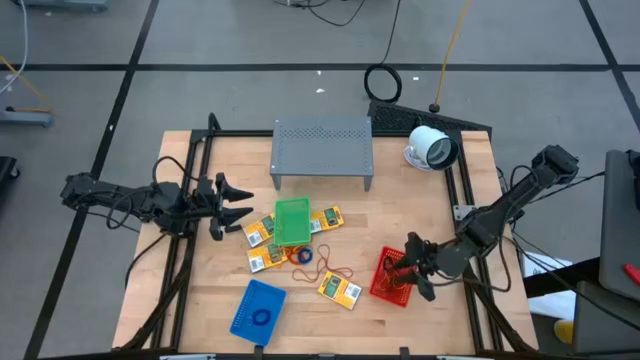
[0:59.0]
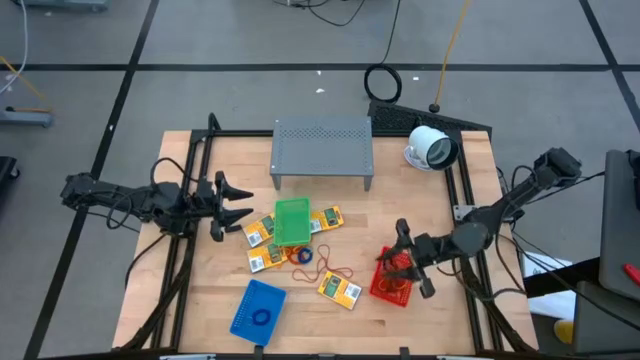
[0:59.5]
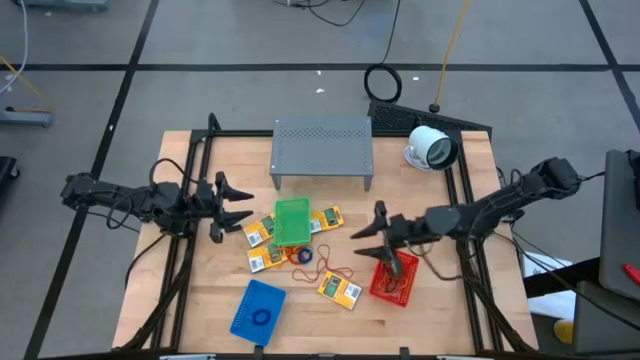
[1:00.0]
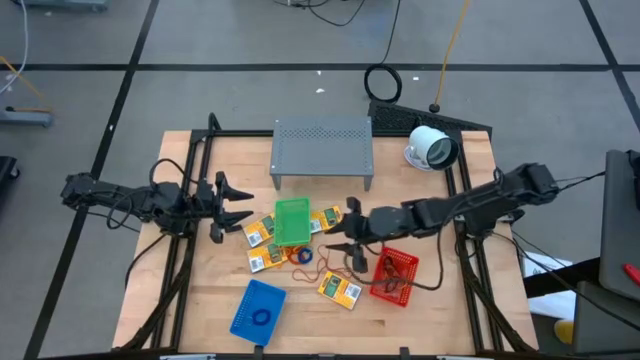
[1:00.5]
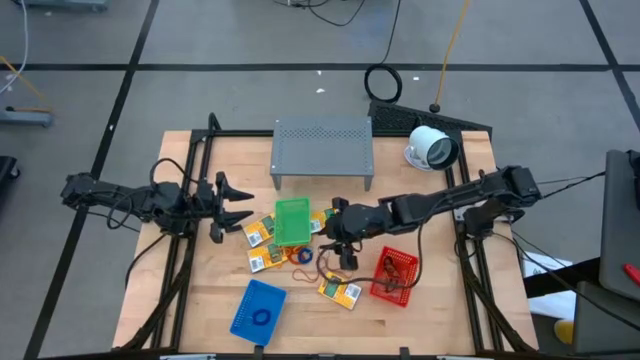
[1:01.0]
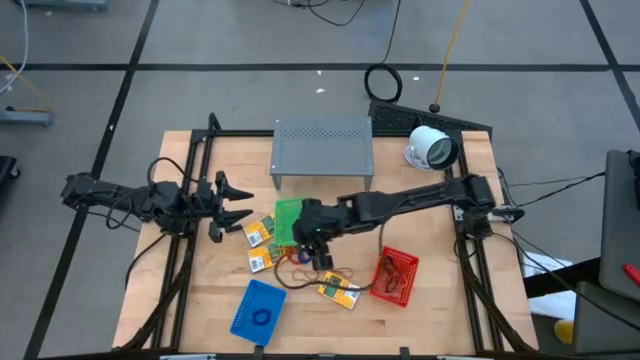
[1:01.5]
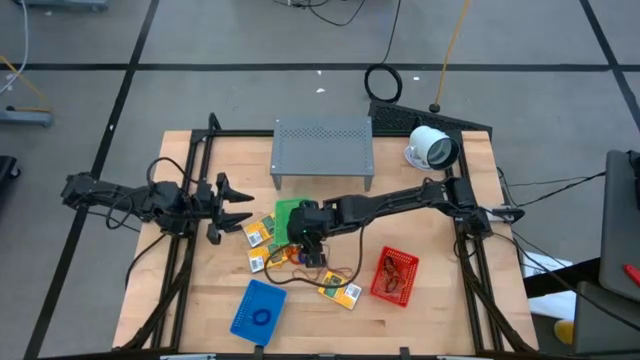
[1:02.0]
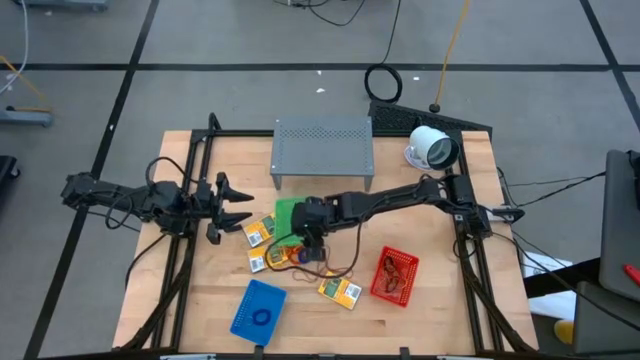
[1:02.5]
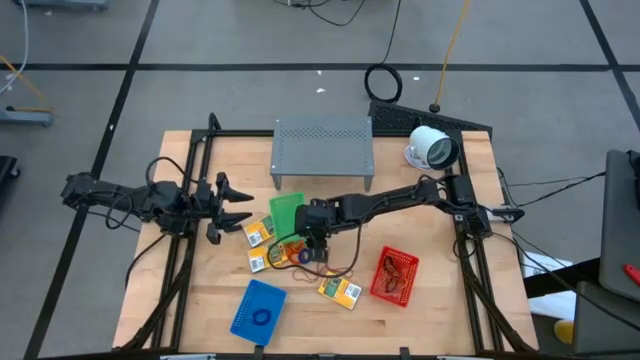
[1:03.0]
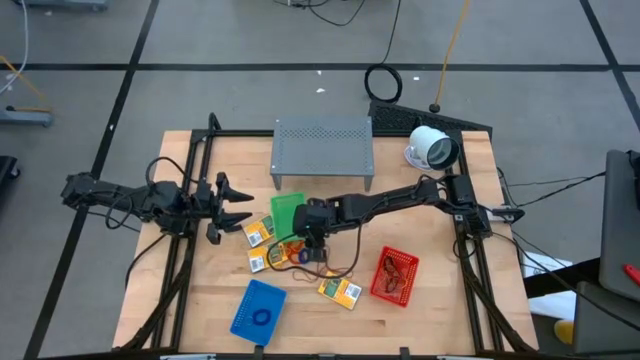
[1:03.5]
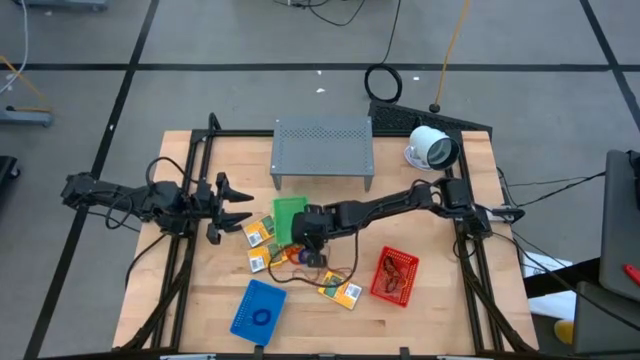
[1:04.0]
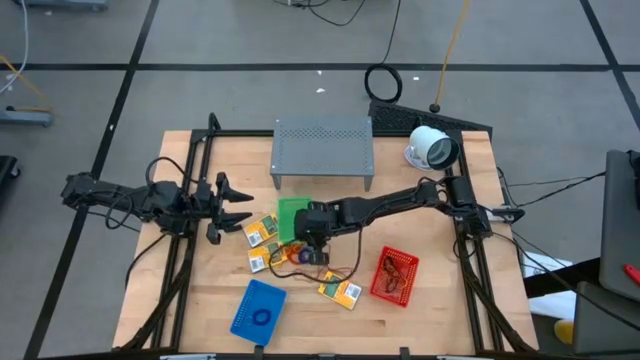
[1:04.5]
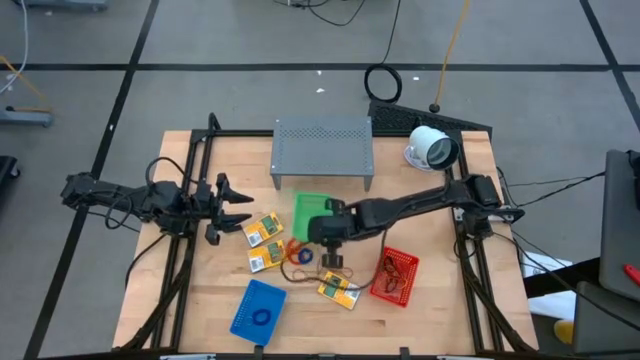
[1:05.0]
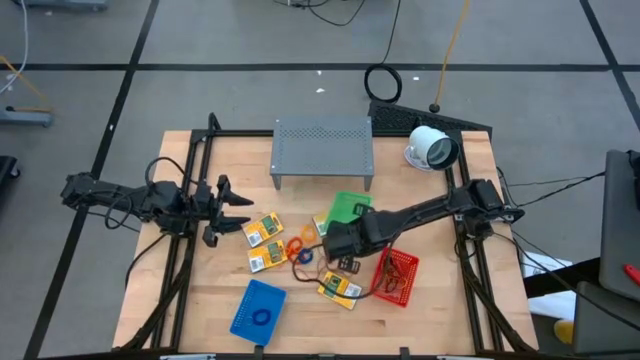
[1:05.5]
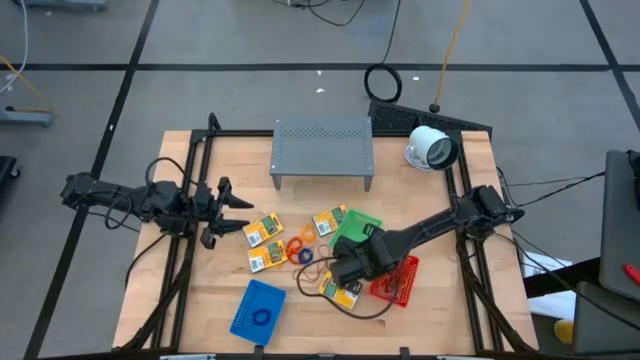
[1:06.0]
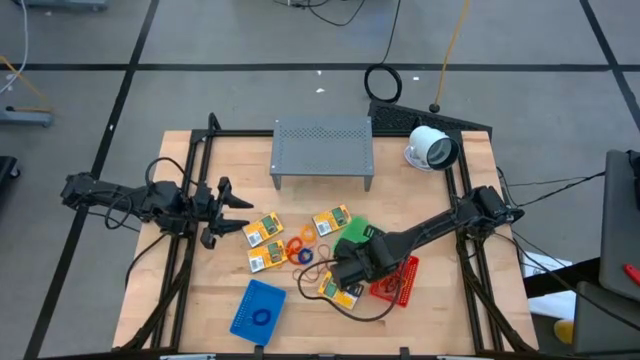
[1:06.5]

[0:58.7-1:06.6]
Task: Pick & Place Office Desk Supplies
Adjust the green bin

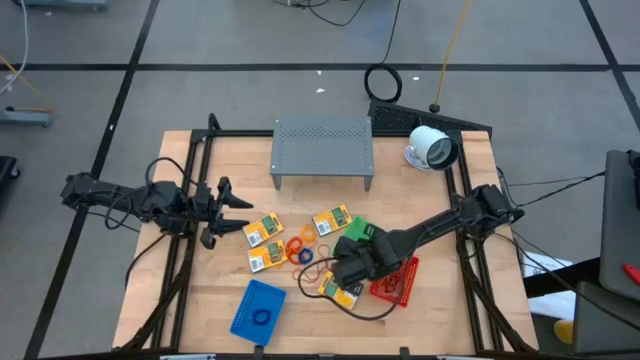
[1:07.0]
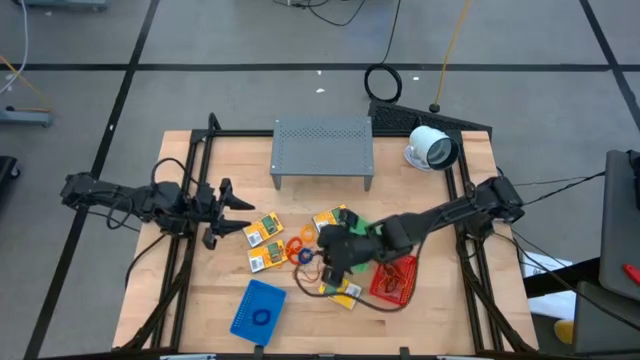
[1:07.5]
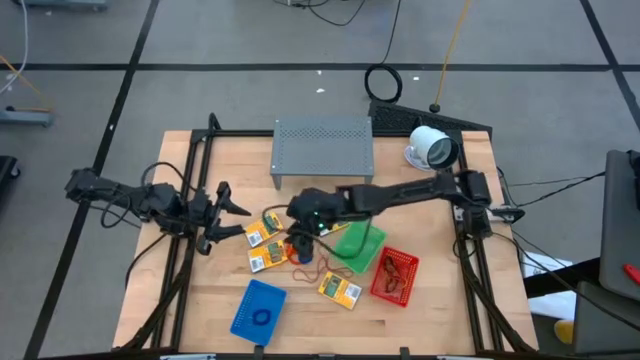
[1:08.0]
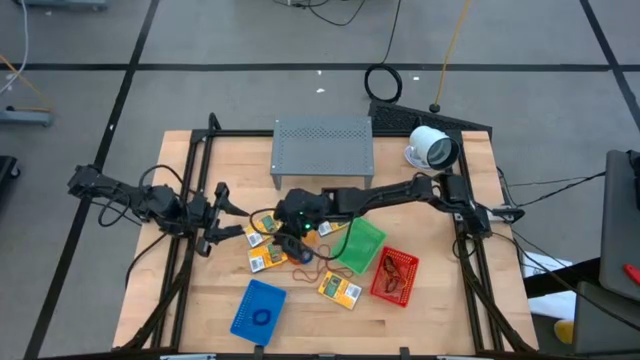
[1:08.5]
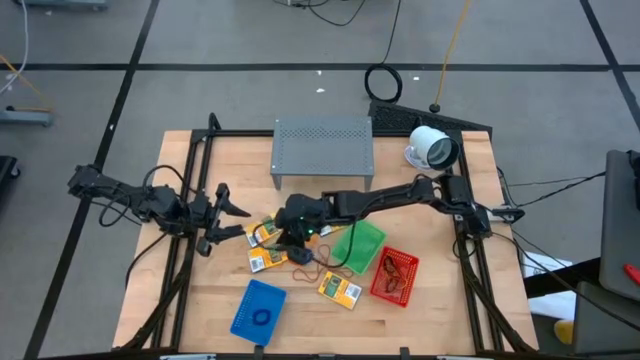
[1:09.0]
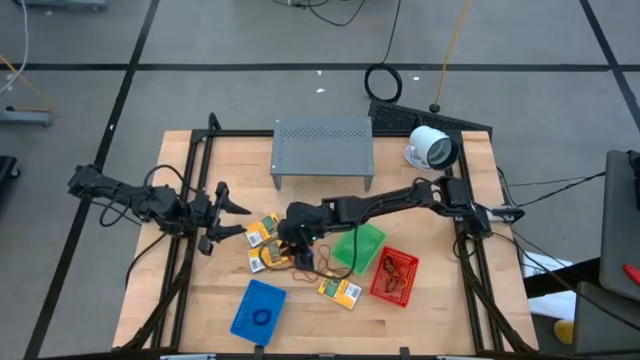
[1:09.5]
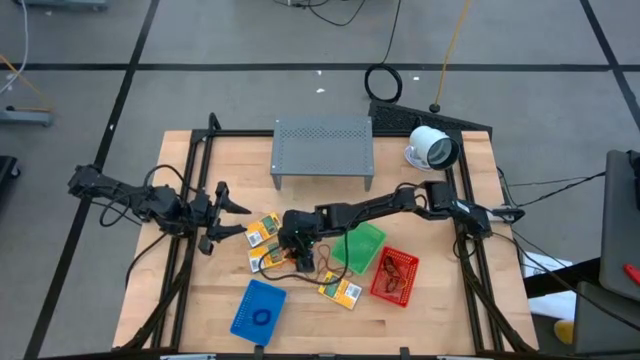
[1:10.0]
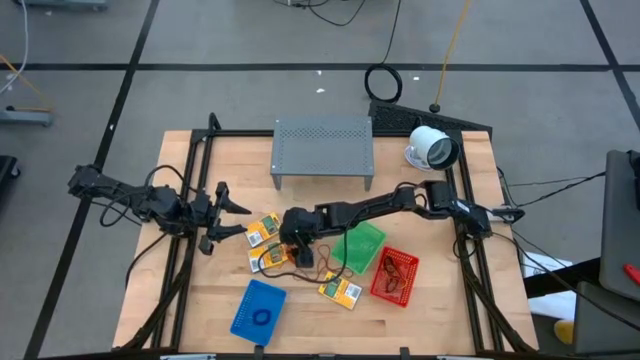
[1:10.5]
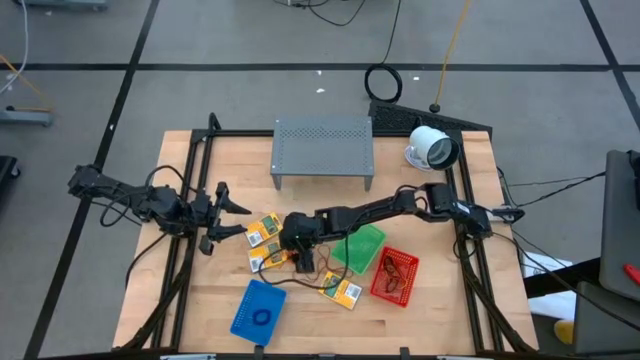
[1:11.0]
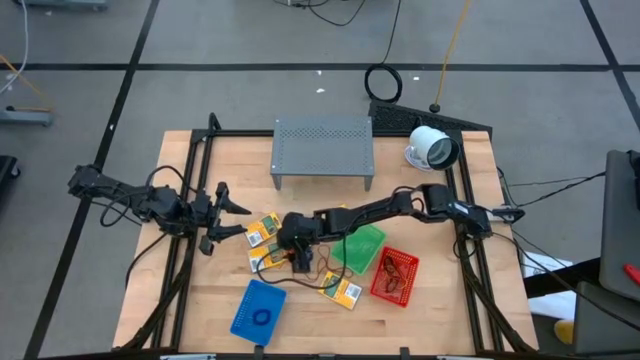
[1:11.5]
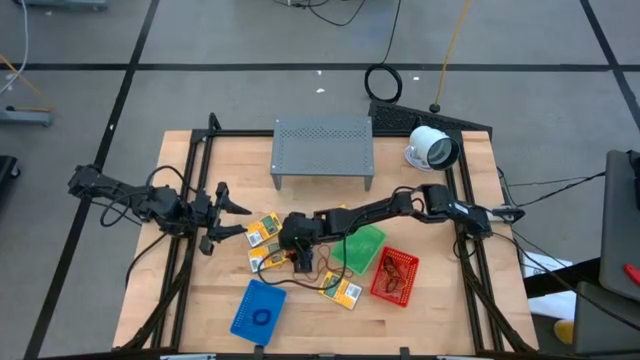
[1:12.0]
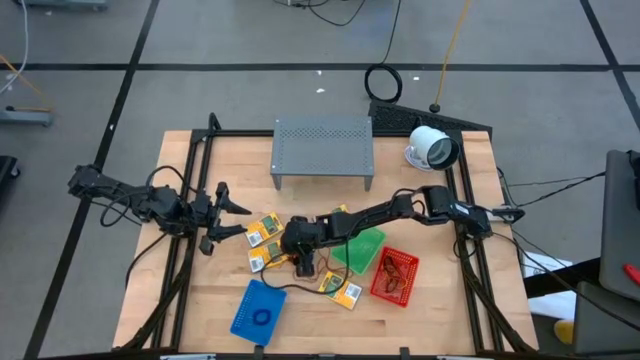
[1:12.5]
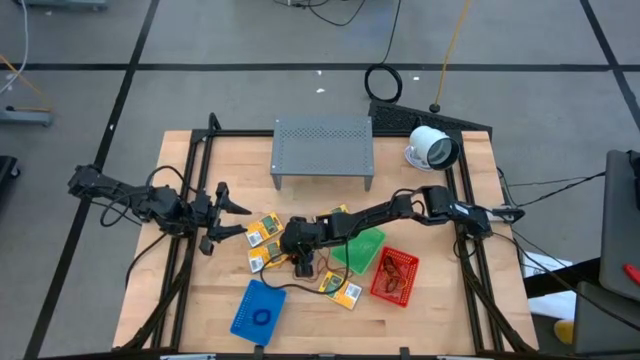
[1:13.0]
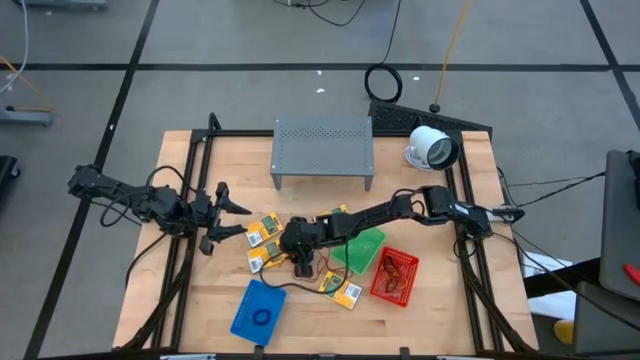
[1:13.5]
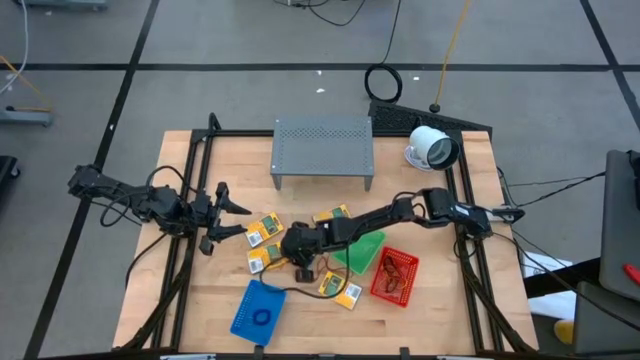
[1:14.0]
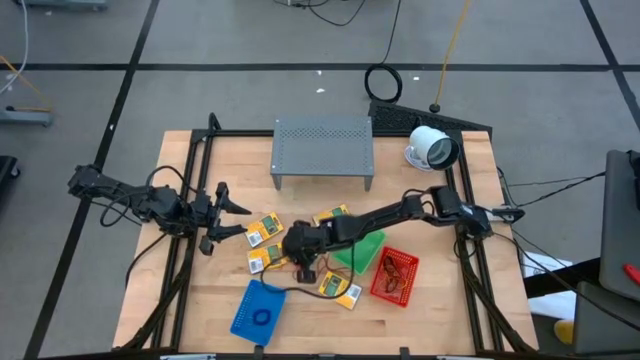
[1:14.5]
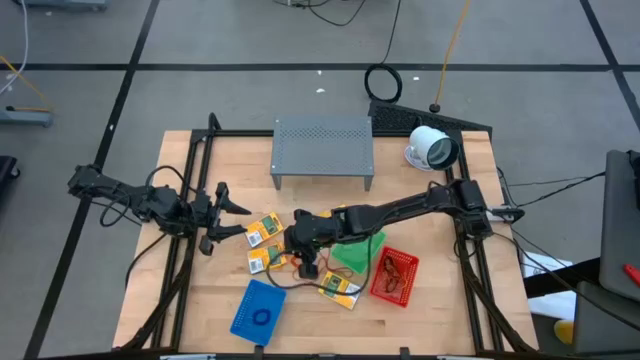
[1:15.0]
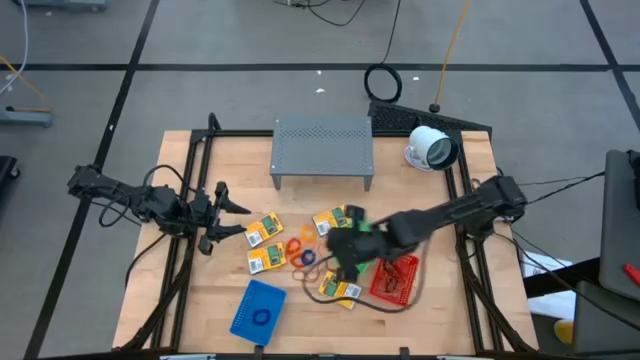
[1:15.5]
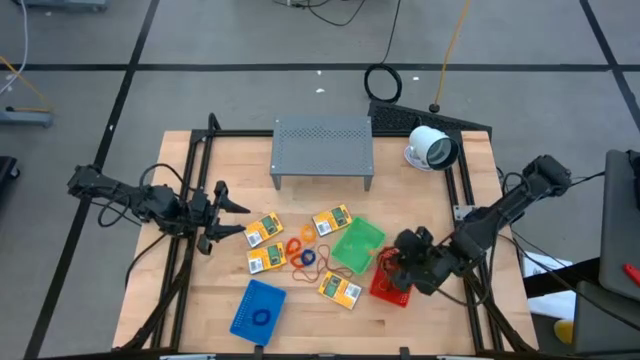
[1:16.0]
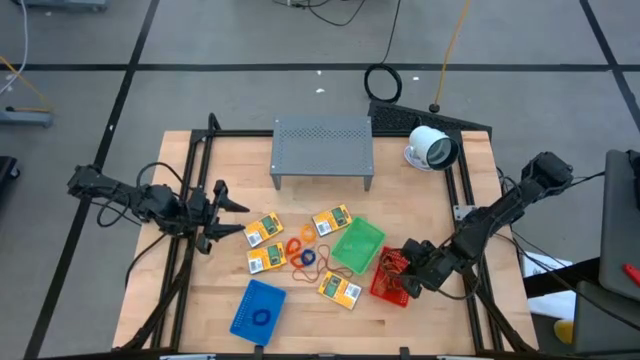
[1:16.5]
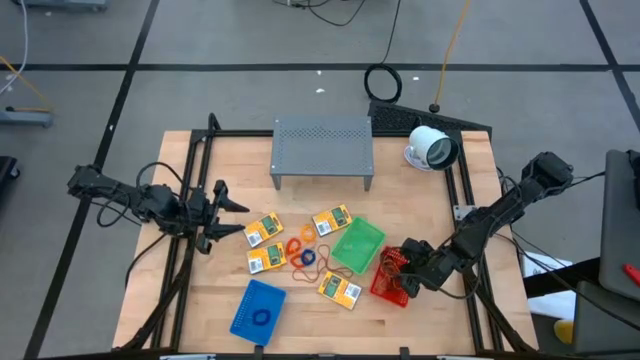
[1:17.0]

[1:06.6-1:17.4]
Put the orange rubber band into the red bin

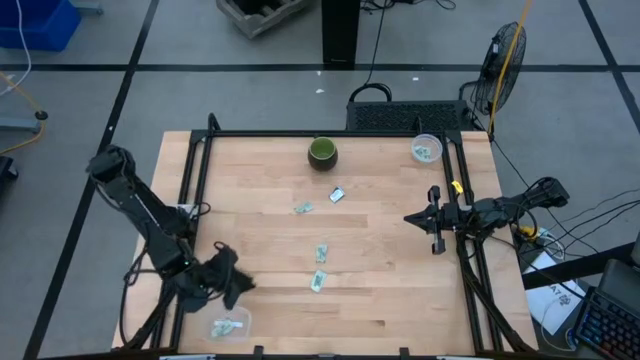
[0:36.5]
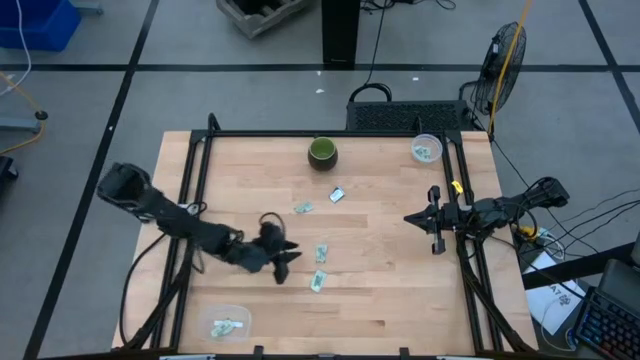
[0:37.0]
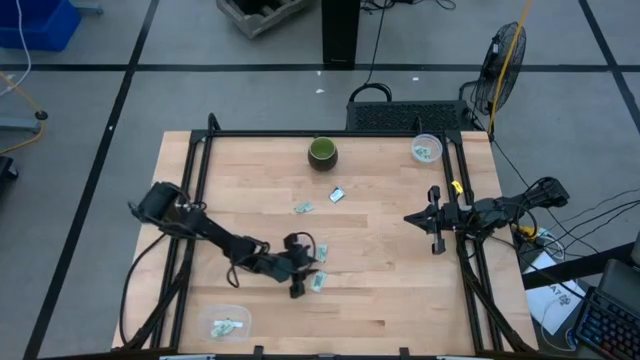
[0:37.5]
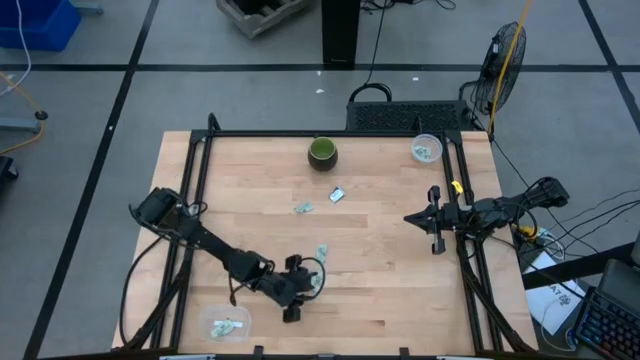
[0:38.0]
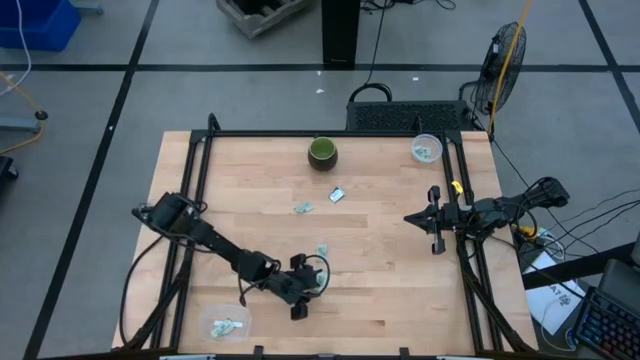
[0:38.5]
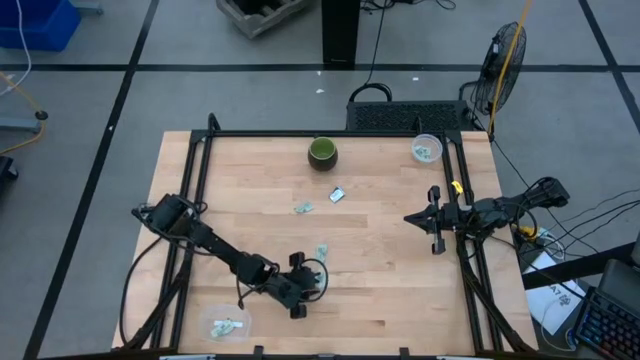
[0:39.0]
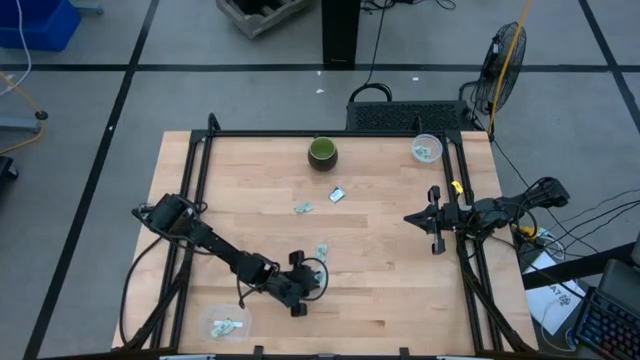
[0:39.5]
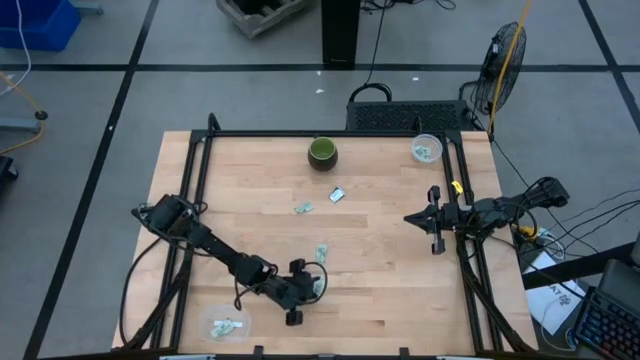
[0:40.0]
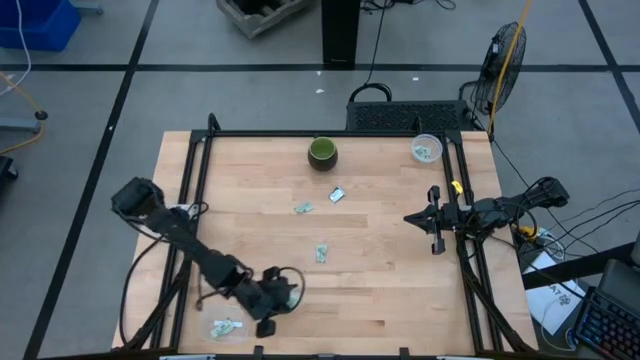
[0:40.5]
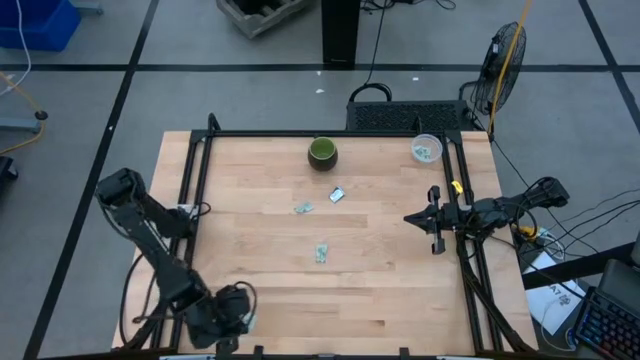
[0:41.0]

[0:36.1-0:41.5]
Task: Pick and place items into bin
Put the stevia packet into the bottom transparent bin
